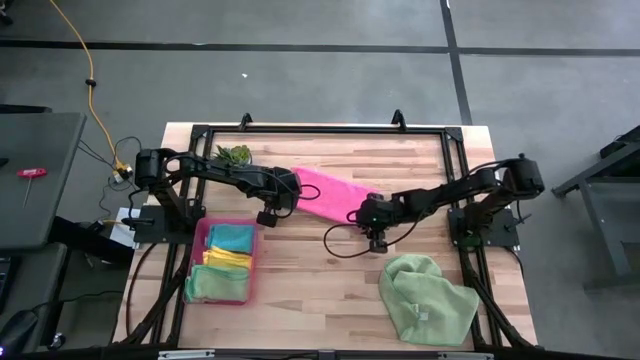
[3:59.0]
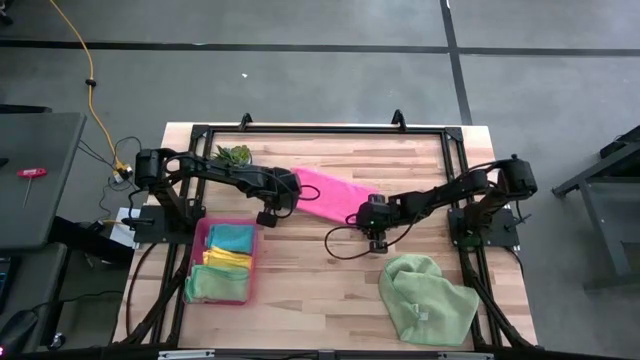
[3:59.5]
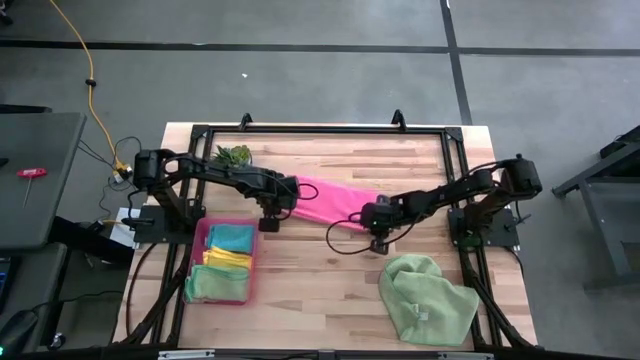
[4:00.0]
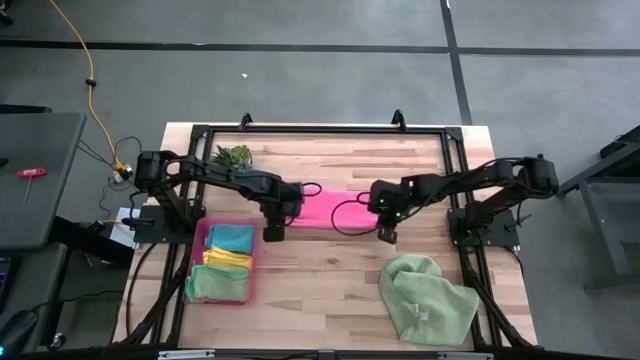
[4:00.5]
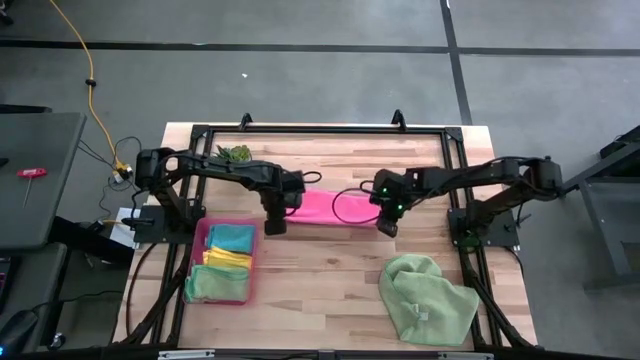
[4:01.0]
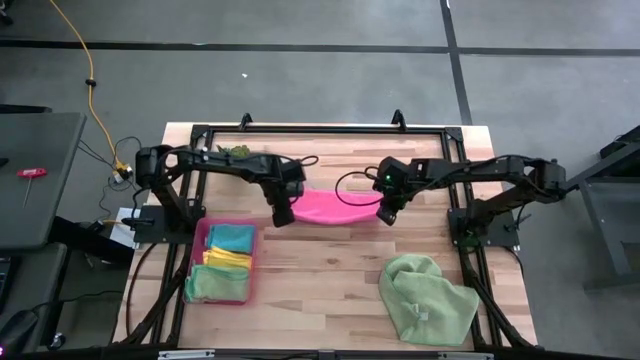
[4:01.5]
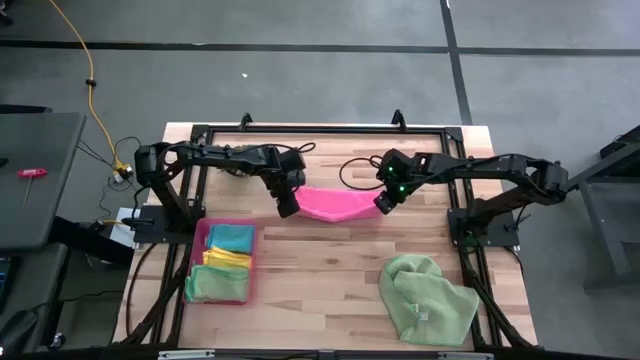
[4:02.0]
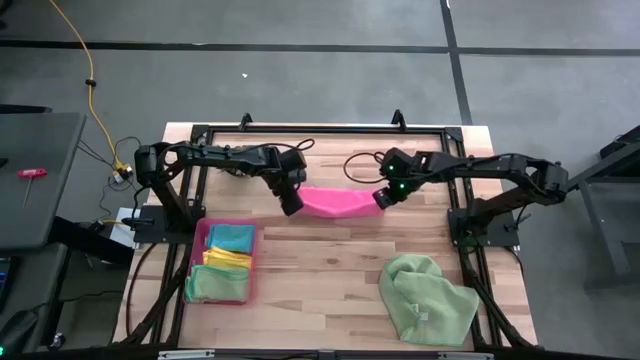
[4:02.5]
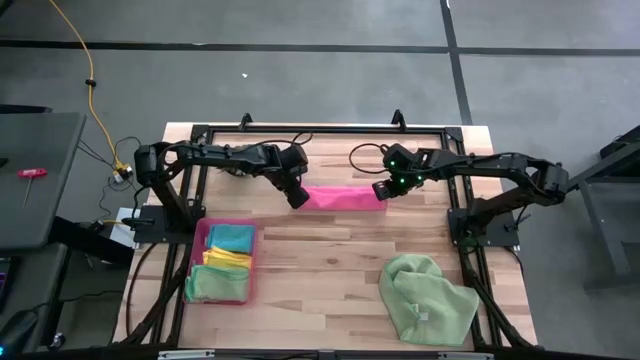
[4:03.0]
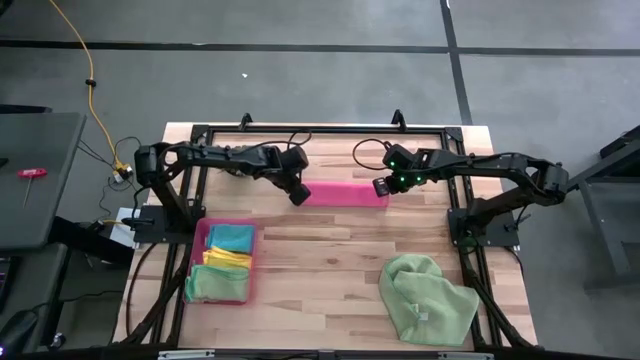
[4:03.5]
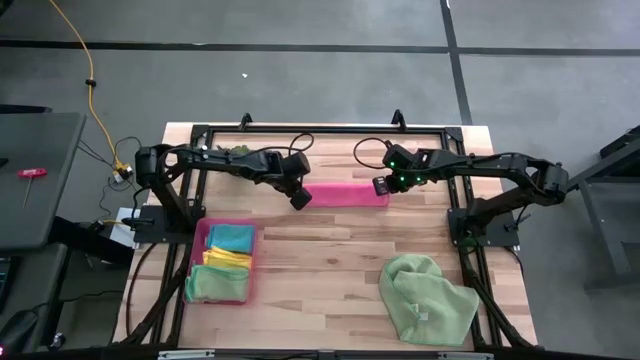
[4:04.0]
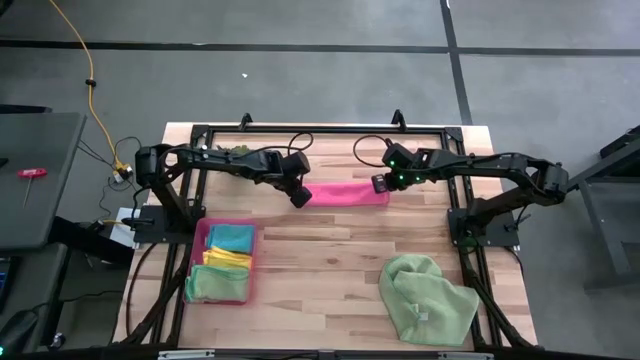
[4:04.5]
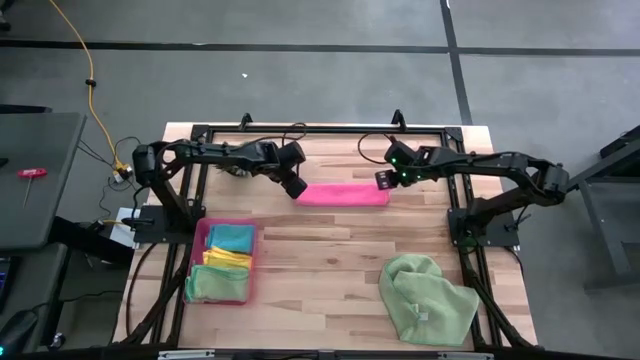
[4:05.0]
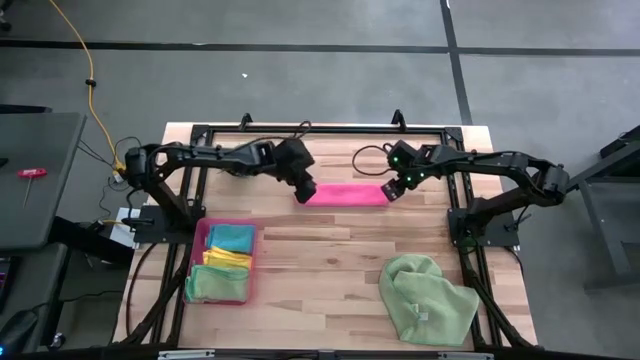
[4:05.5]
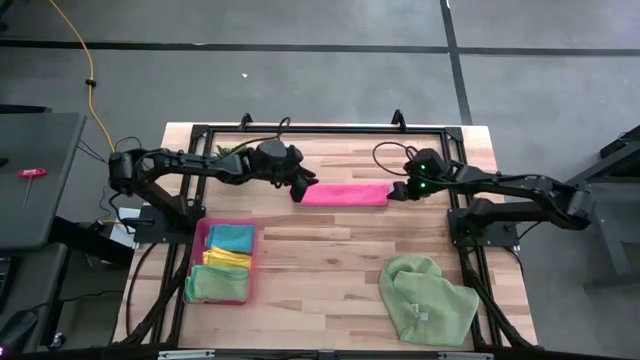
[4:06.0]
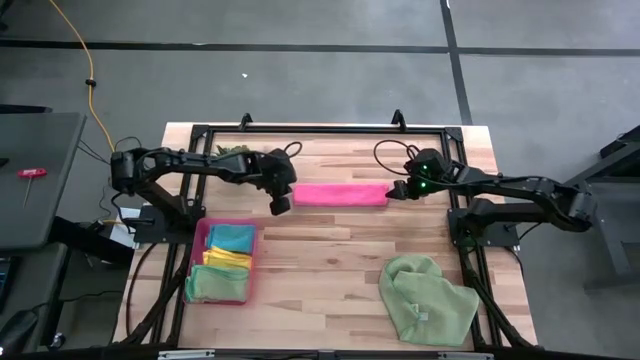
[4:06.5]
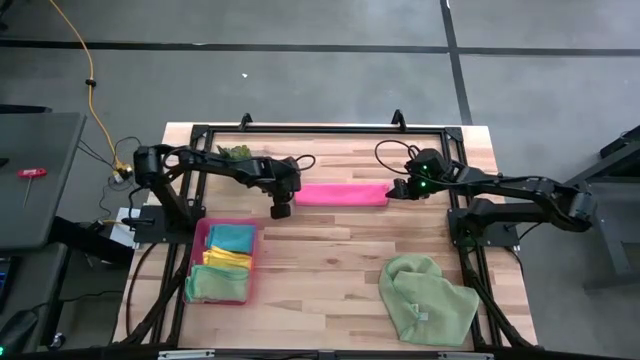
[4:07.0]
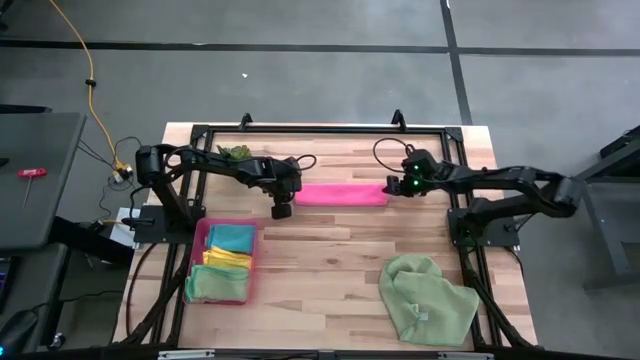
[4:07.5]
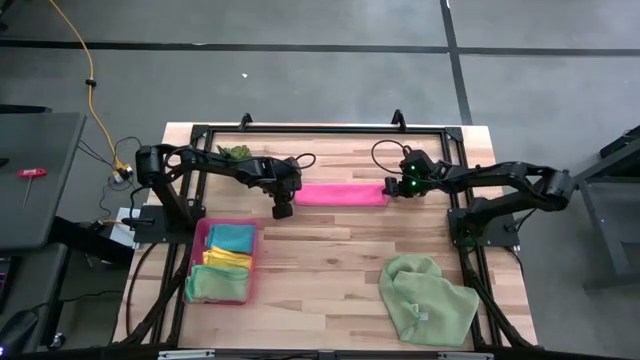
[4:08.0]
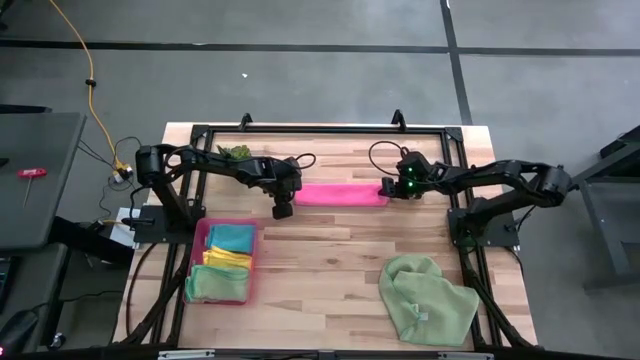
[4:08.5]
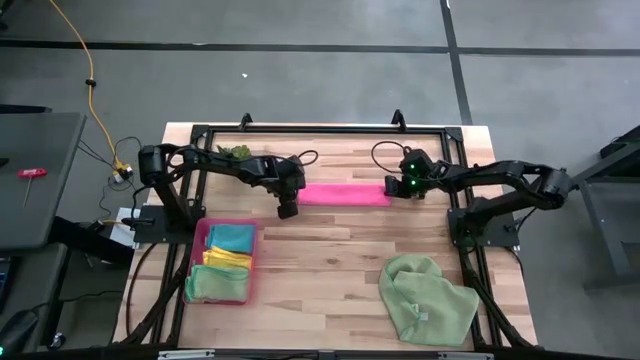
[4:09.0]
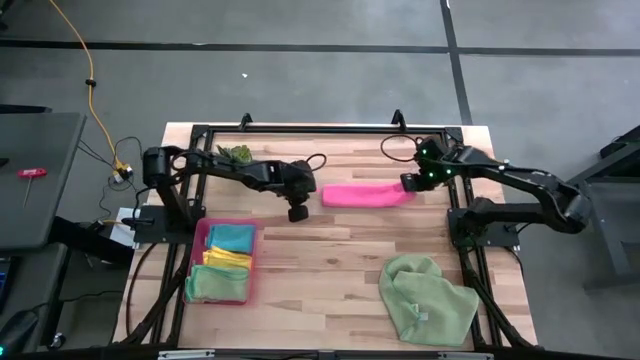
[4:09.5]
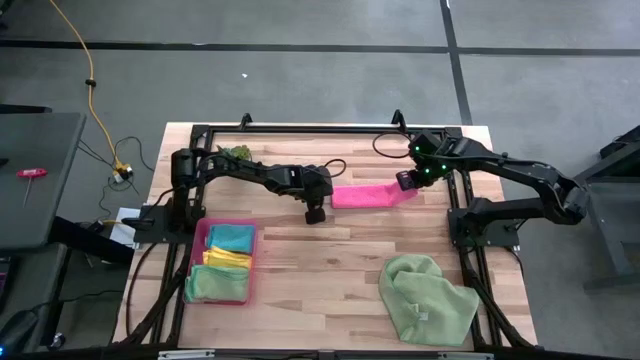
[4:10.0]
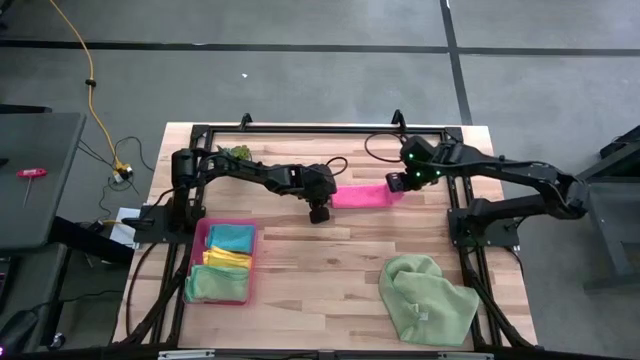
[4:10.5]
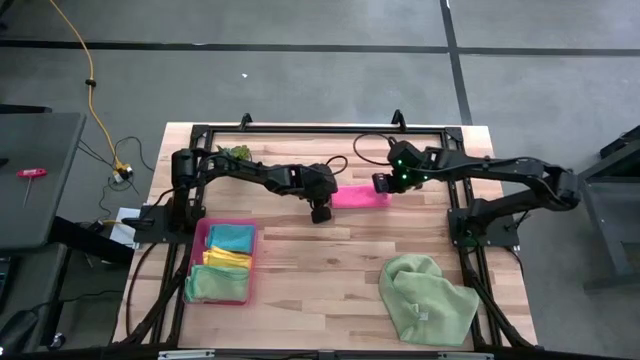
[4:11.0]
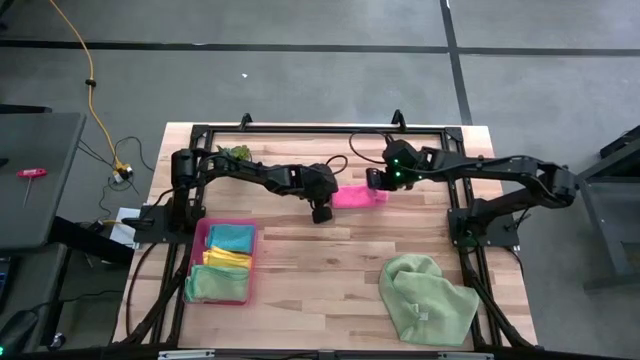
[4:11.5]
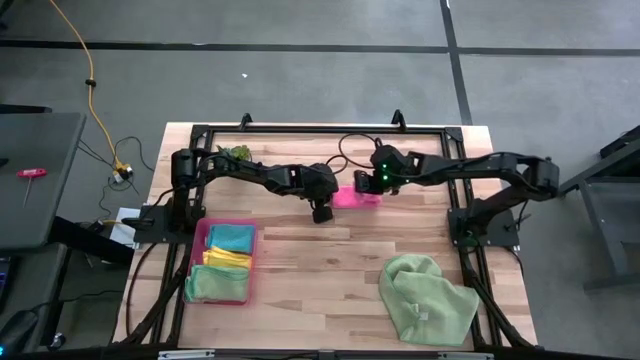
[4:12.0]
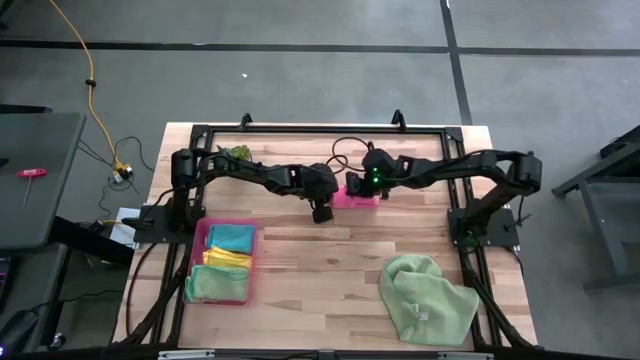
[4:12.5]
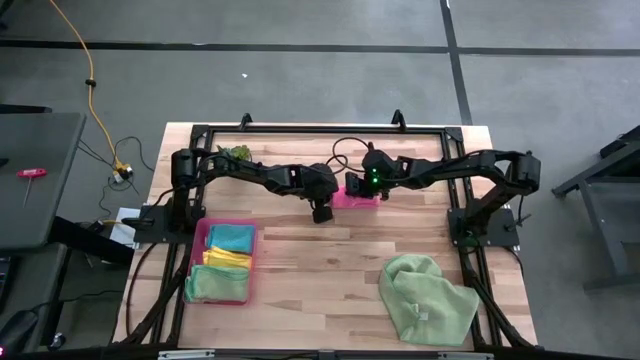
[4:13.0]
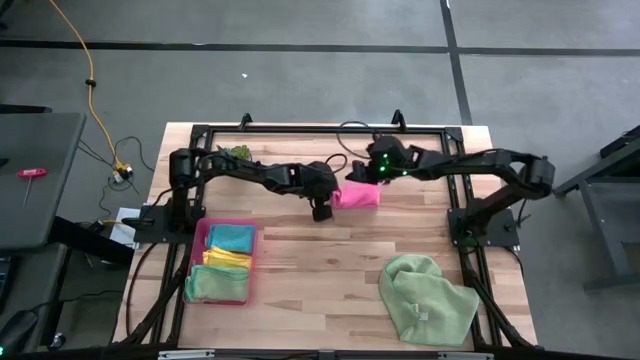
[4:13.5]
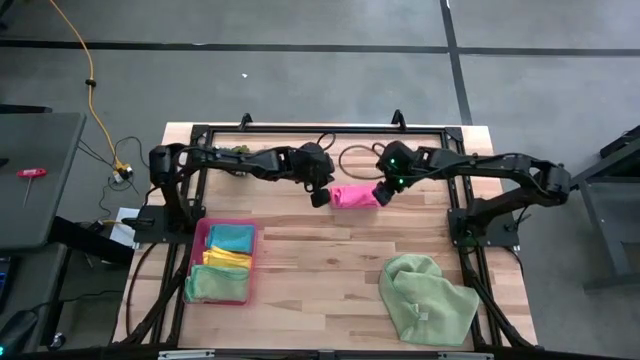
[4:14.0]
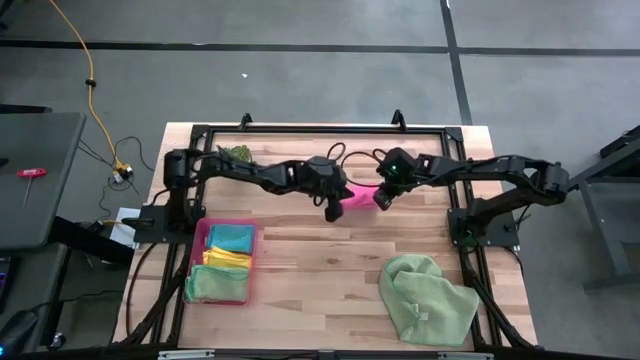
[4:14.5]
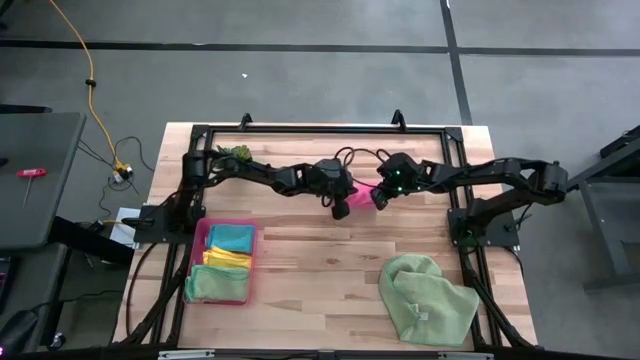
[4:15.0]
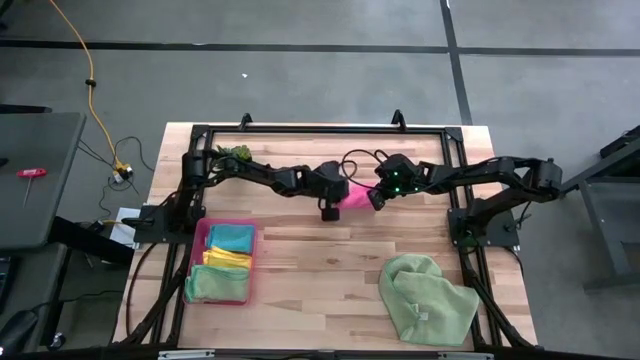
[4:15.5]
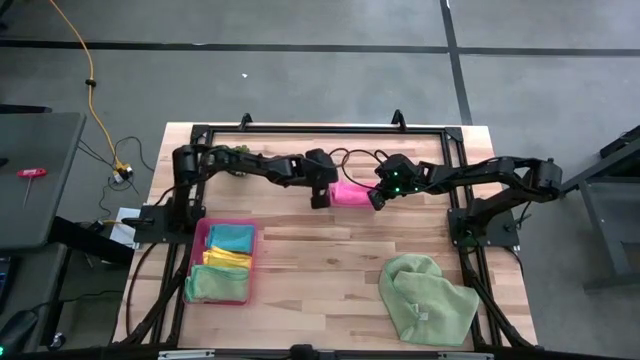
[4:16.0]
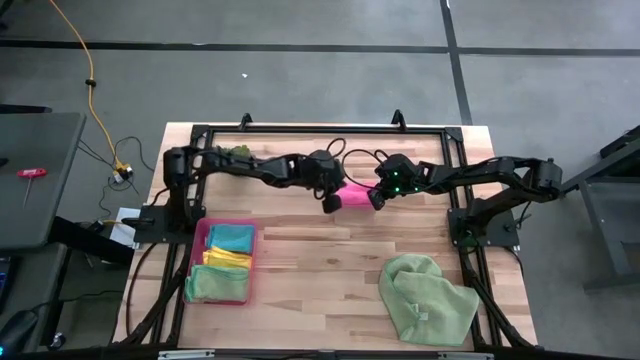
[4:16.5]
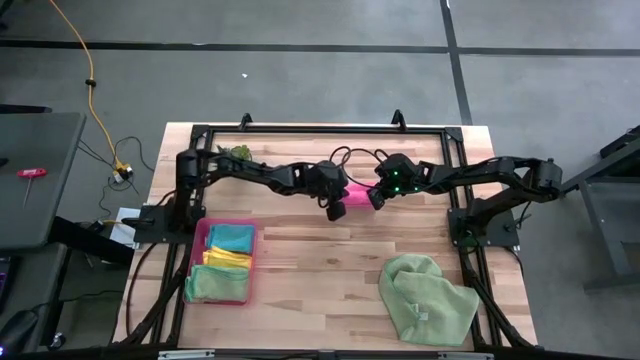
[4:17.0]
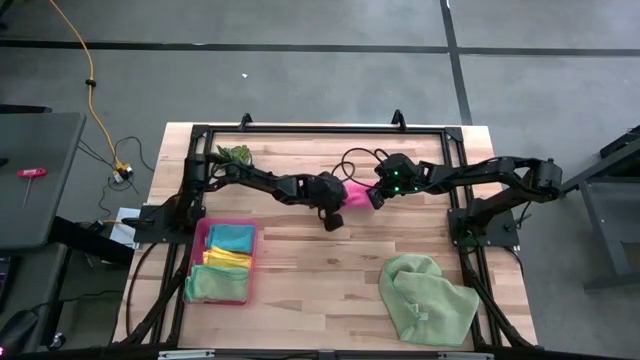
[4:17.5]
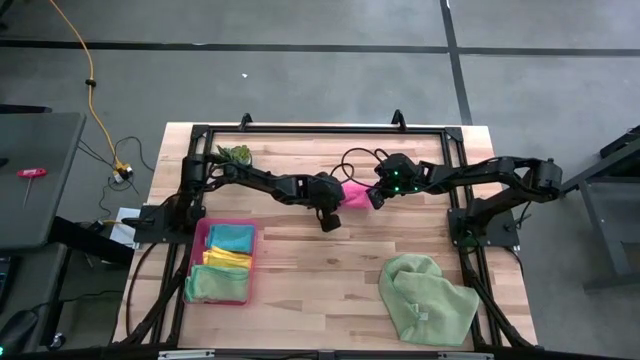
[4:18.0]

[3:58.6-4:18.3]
Task: Fold microfiber towels
Fold the pink microfiber towel
